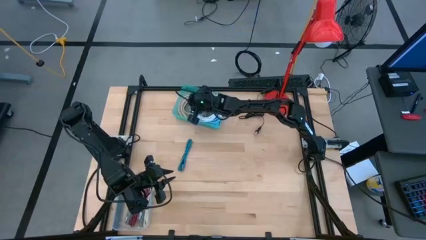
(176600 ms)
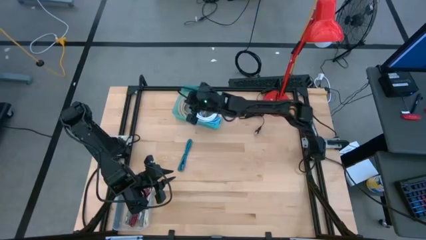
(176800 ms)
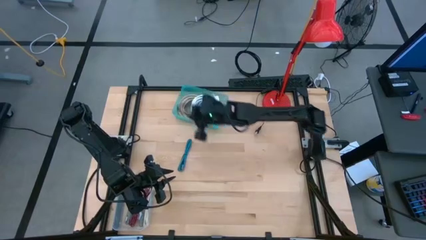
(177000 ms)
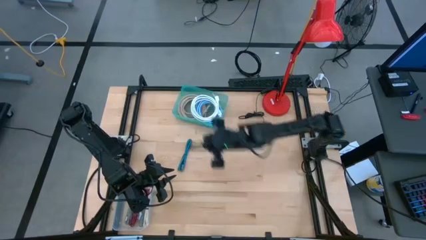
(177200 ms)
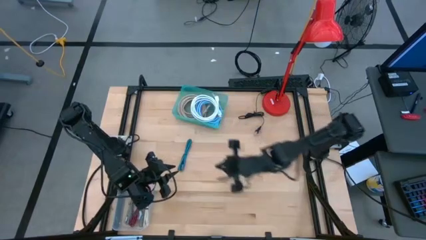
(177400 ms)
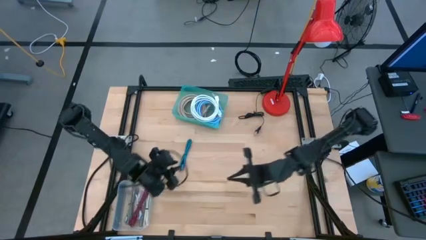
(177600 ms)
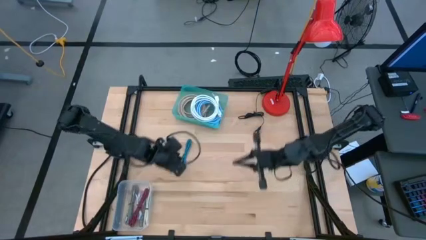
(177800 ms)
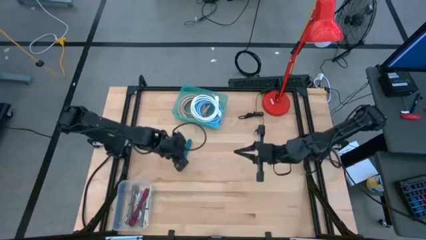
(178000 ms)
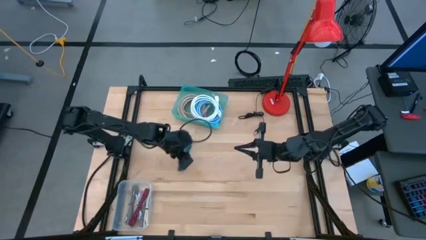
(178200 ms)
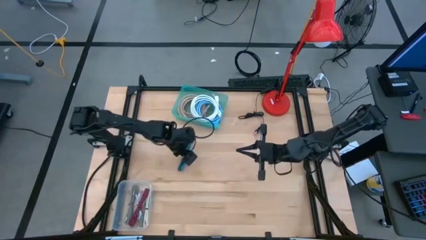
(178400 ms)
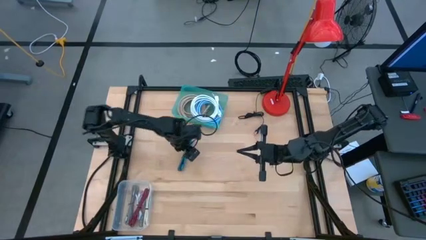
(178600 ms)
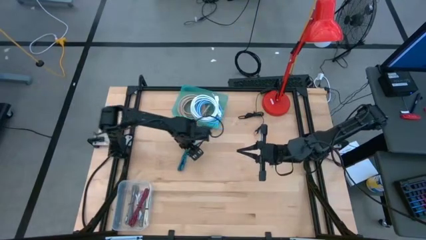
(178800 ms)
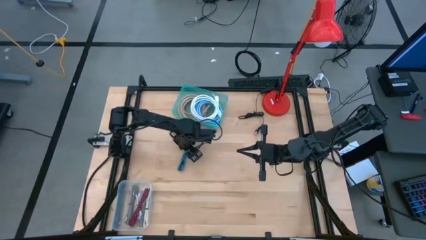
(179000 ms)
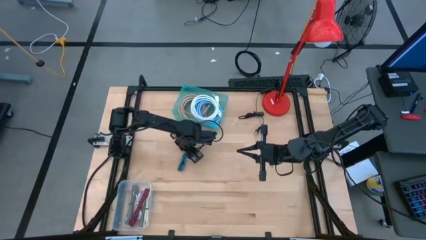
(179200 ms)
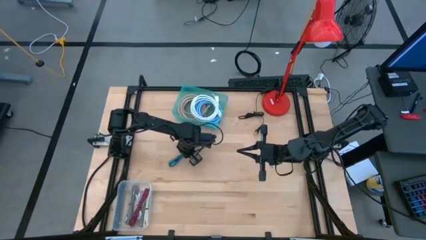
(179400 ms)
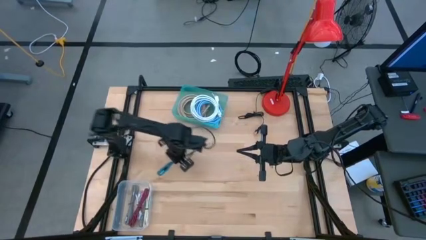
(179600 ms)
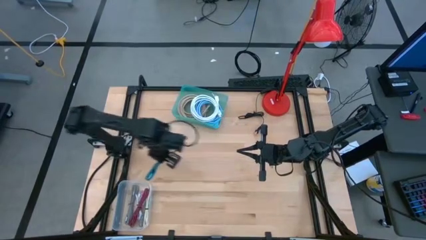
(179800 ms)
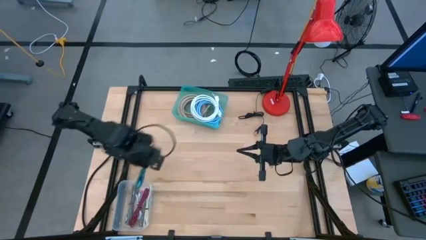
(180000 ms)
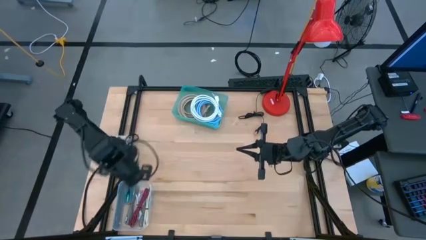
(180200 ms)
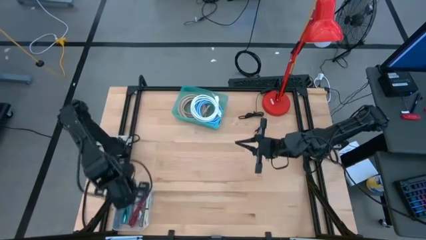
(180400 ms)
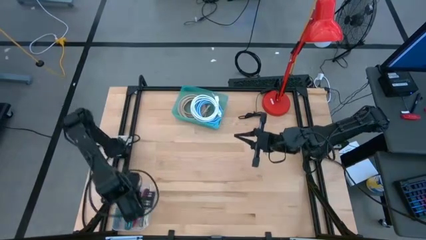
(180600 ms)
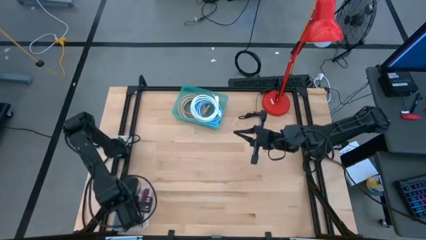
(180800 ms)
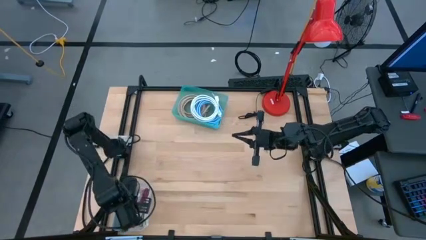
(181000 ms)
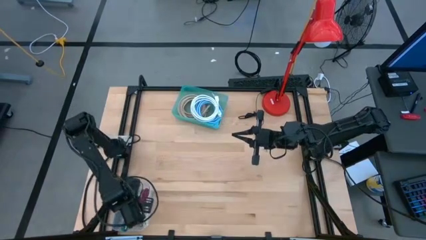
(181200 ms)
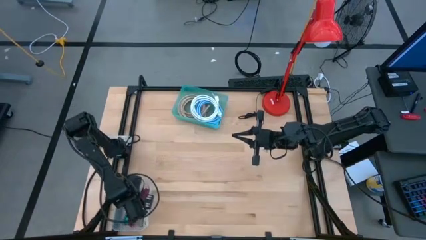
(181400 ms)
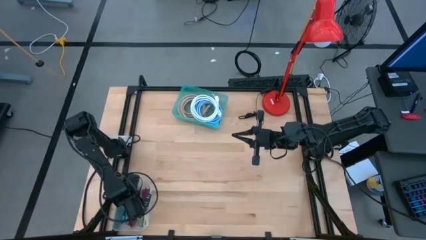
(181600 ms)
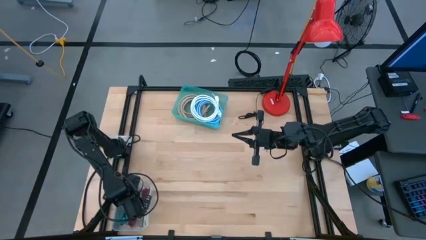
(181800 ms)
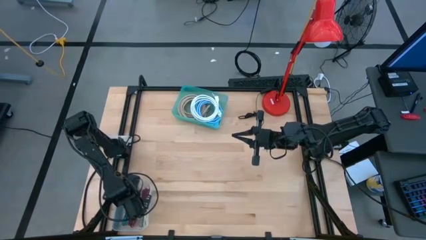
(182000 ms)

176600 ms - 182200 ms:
Task: Pick & Place USB Port
Put the blue black charger cable into the transparent bin

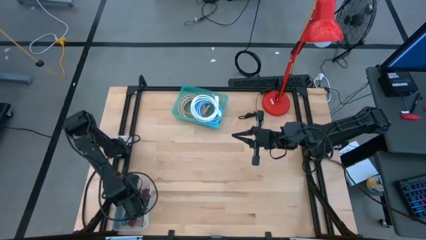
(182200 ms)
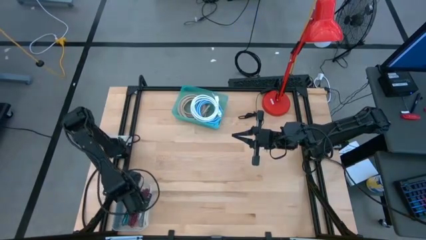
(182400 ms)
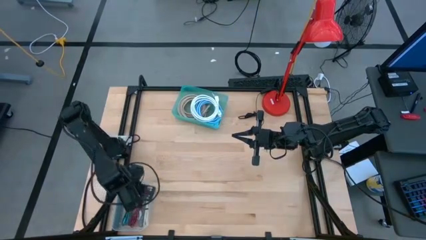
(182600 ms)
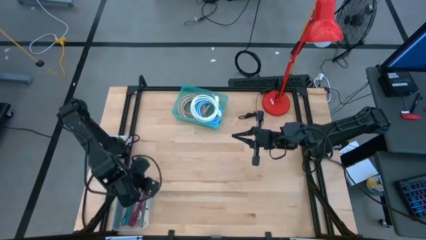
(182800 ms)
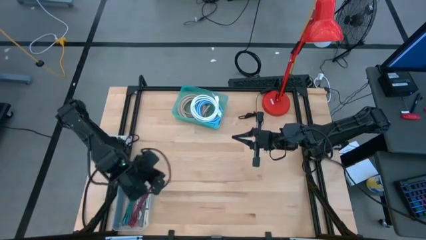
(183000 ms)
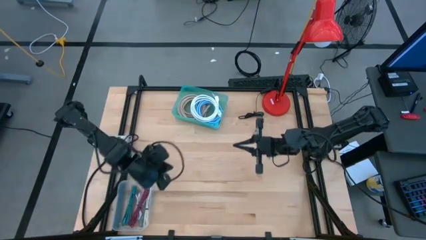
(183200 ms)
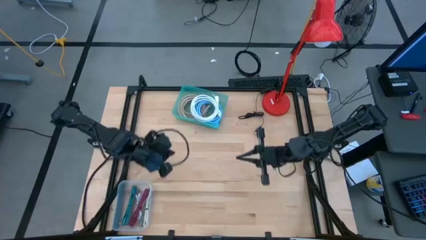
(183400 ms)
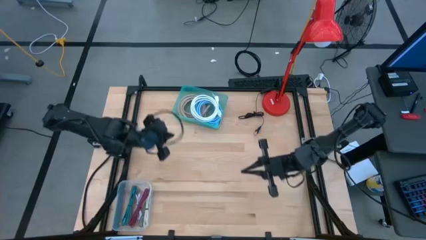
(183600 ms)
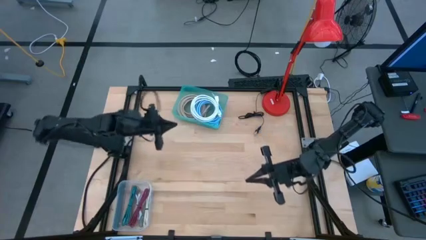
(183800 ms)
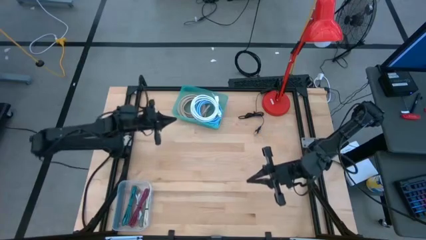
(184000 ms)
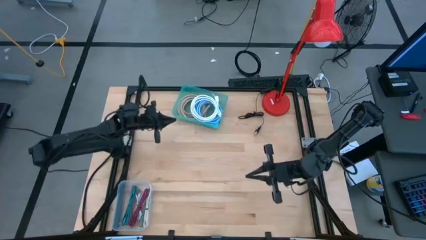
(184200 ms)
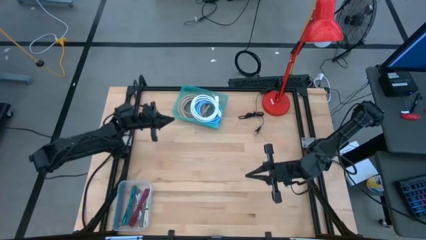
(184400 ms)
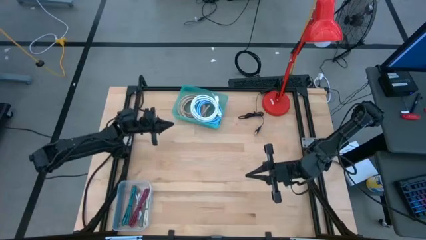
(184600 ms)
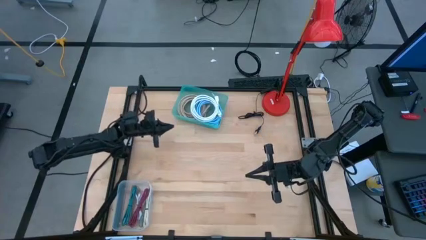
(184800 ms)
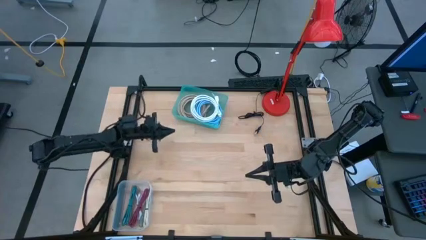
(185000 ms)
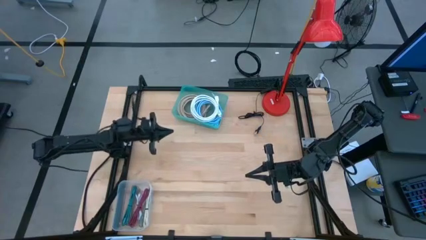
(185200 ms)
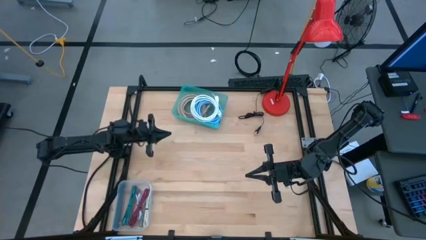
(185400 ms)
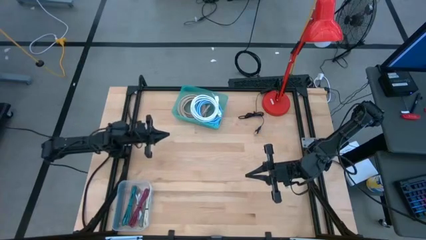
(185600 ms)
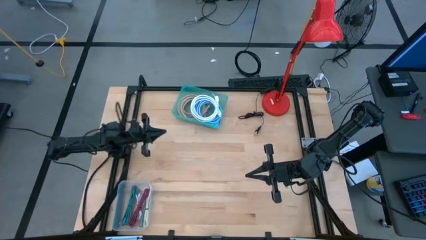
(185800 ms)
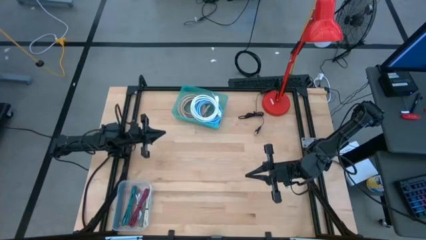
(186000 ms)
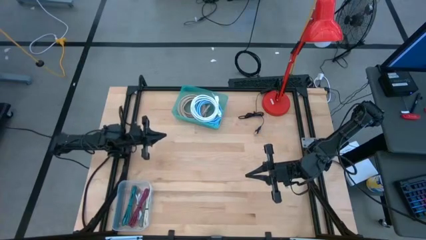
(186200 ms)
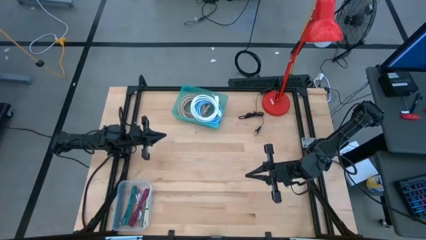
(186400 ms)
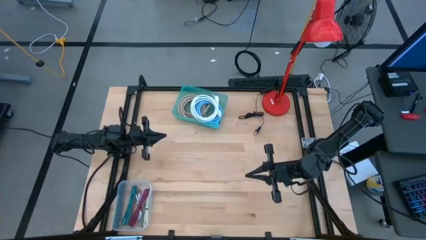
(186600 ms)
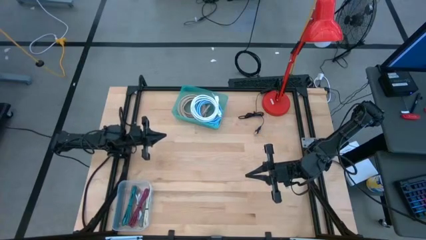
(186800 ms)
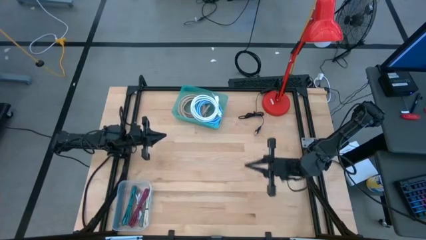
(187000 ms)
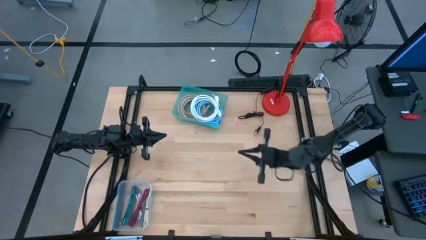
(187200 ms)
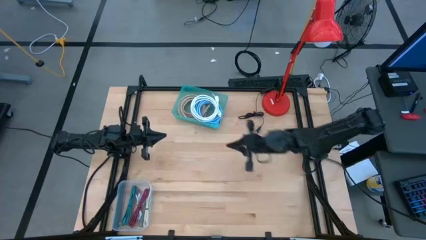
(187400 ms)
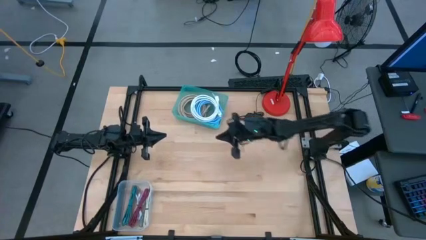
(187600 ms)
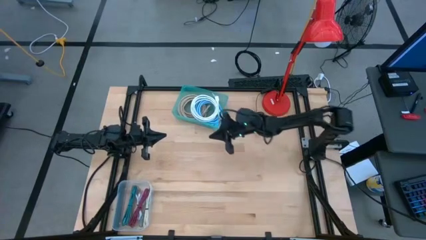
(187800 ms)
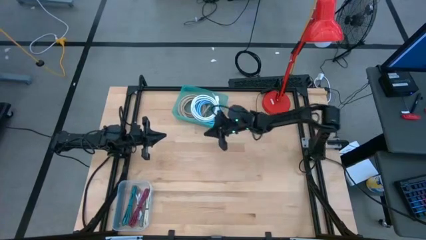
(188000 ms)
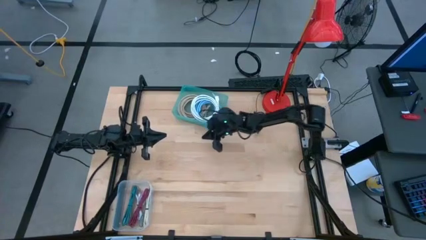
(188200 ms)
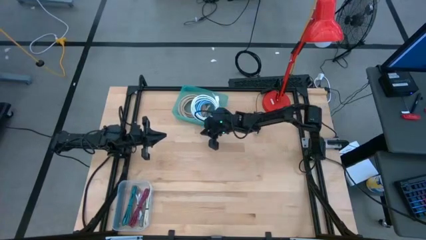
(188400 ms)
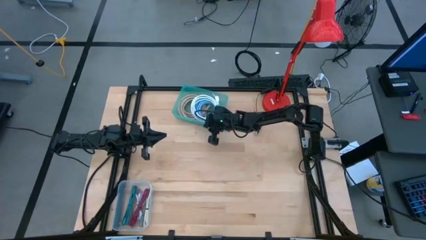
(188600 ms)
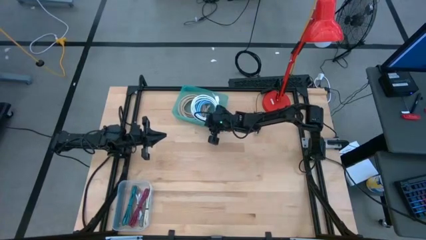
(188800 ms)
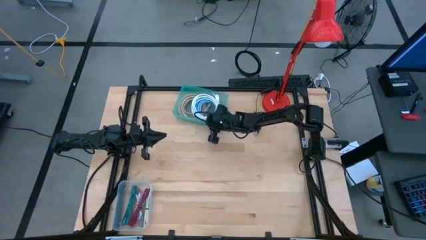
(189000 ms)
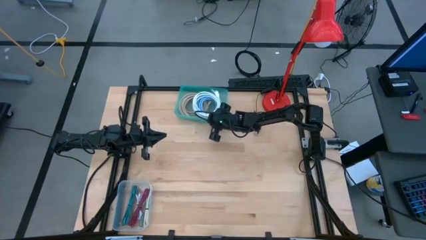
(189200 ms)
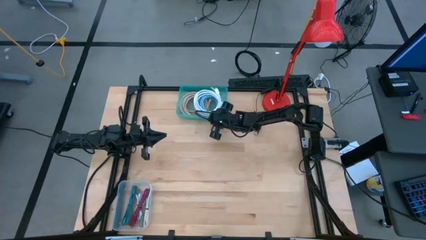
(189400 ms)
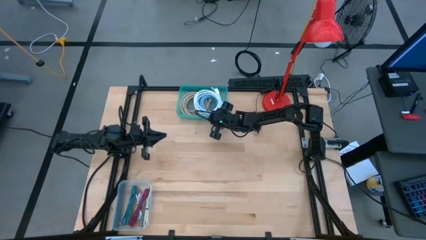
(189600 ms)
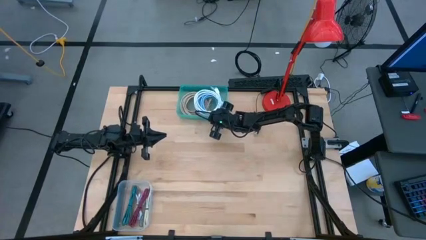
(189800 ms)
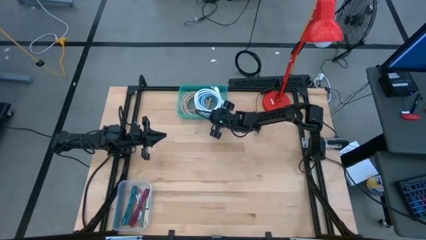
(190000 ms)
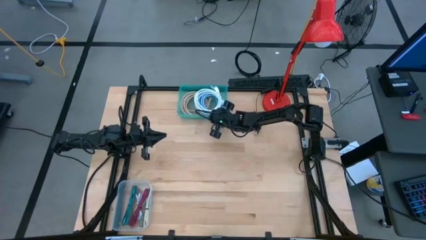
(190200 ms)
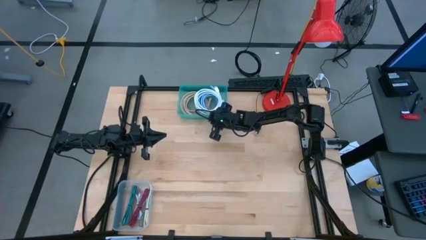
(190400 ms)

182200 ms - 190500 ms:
Adjust the green bin

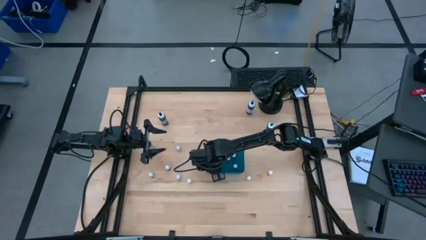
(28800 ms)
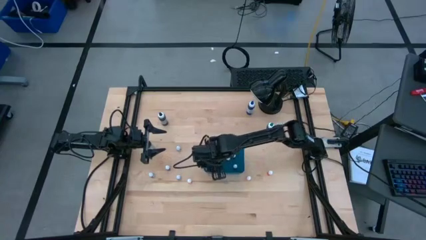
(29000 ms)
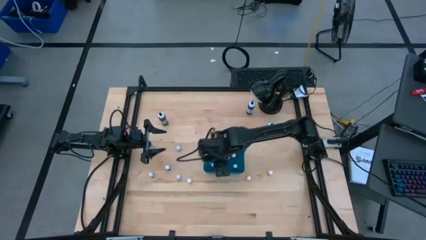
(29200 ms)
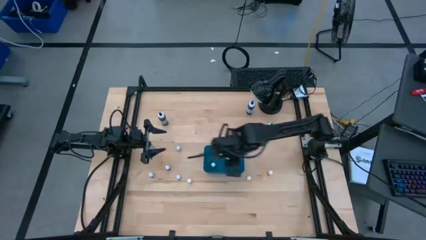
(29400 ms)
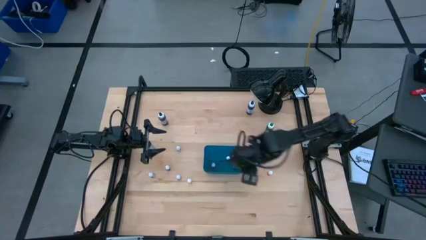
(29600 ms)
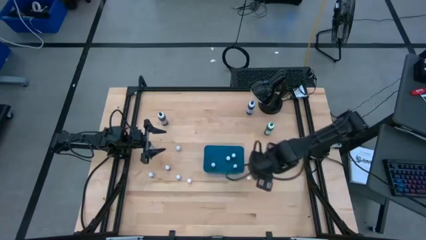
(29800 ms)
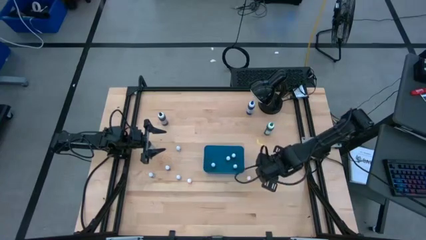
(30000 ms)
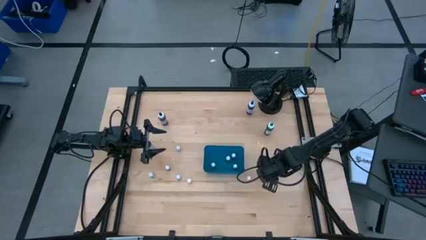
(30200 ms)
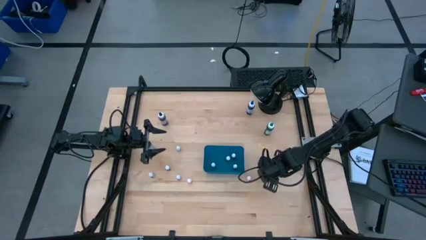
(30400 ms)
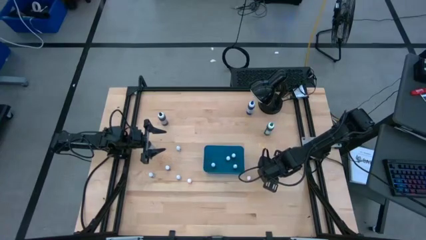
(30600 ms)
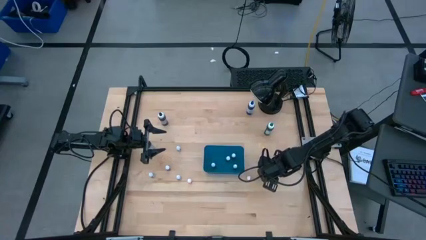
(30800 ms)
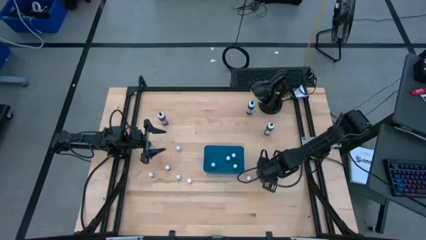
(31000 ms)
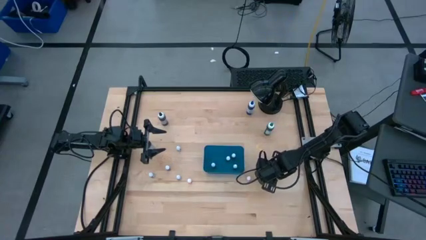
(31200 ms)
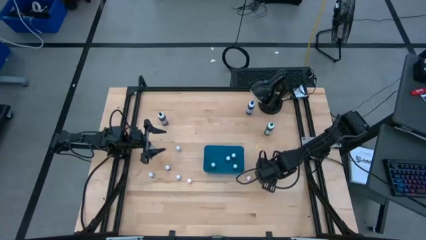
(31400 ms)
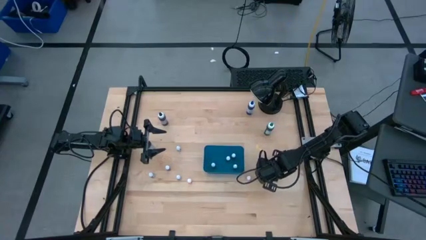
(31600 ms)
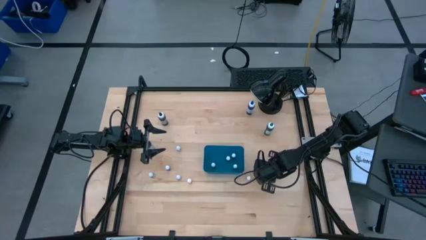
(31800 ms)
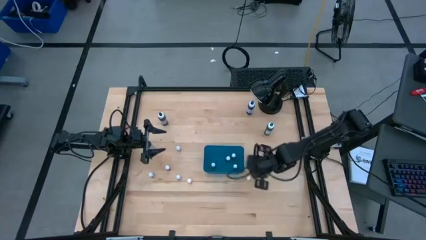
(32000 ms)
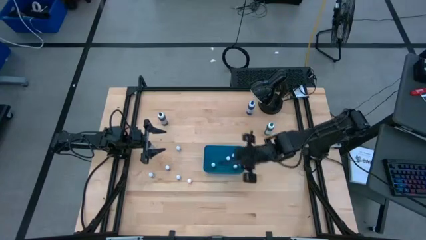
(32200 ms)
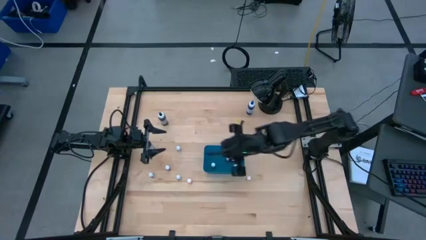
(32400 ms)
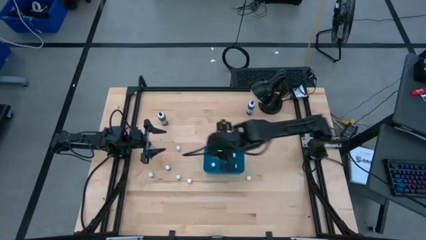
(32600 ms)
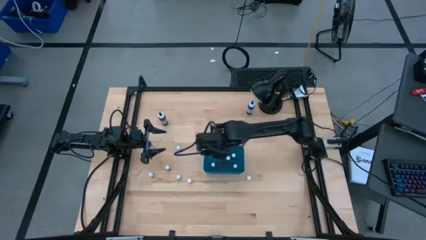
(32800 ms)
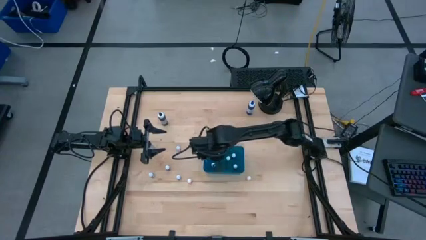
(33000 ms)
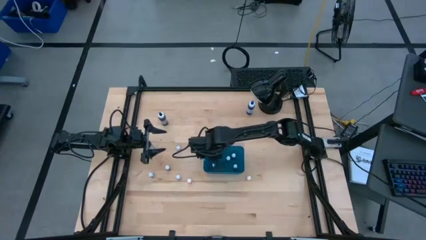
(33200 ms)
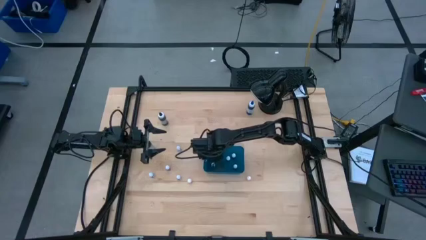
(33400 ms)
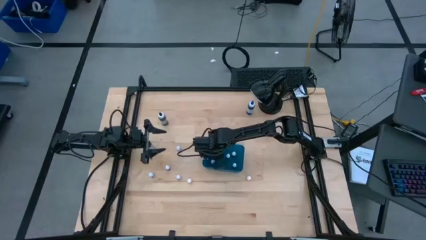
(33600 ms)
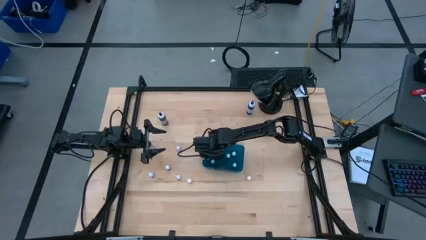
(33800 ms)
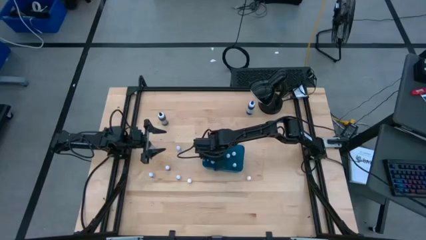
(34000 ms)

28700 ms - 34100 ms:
Task: Pick & Place food coloring
Put the small orange food coloring bottle into the blue bin
